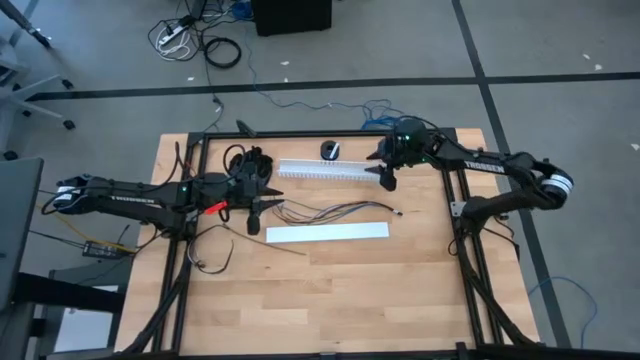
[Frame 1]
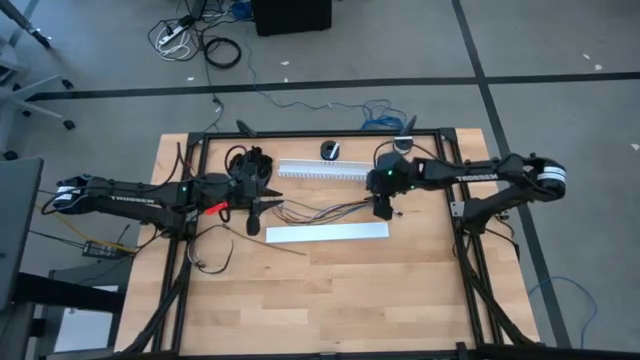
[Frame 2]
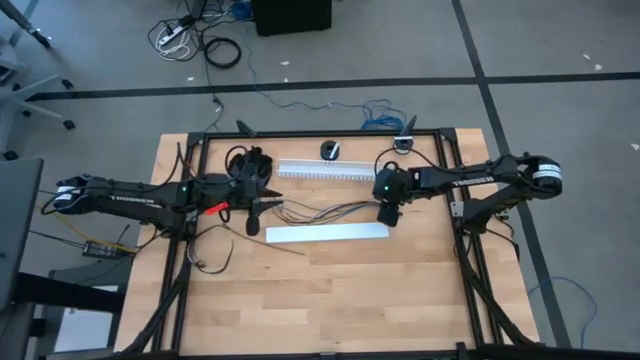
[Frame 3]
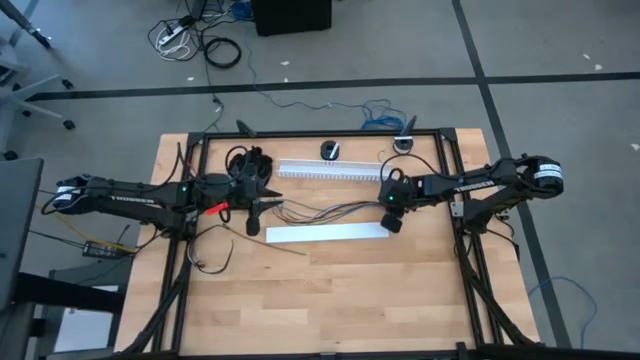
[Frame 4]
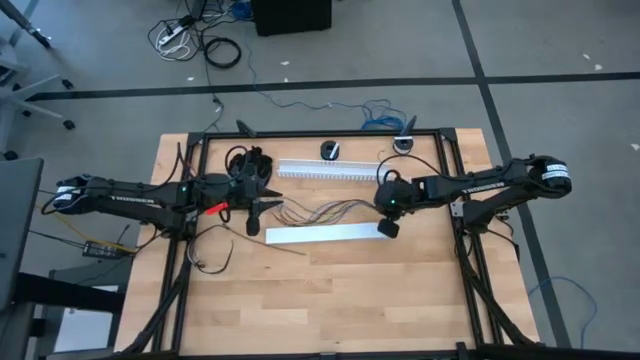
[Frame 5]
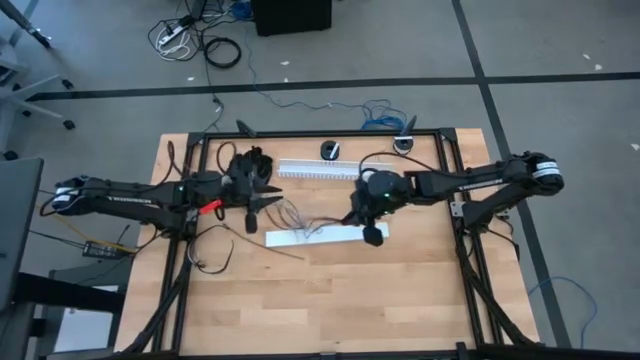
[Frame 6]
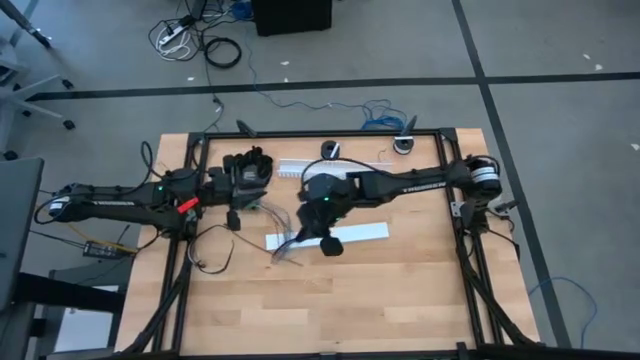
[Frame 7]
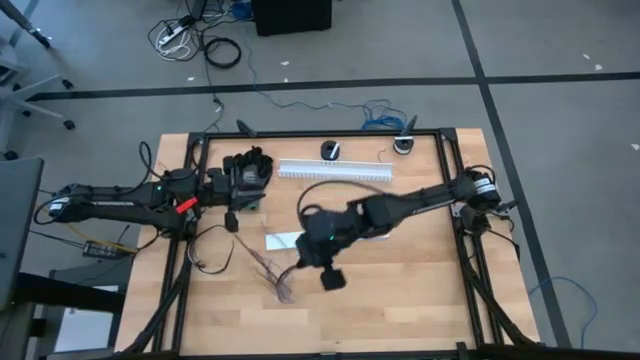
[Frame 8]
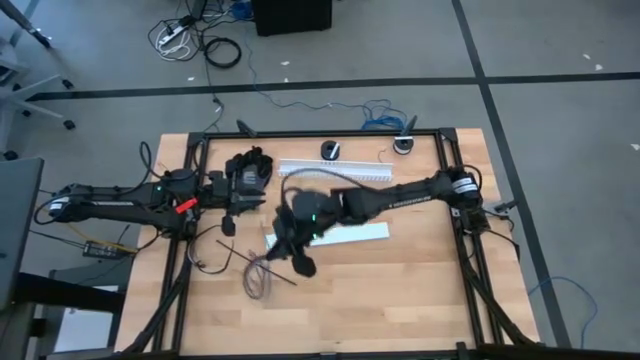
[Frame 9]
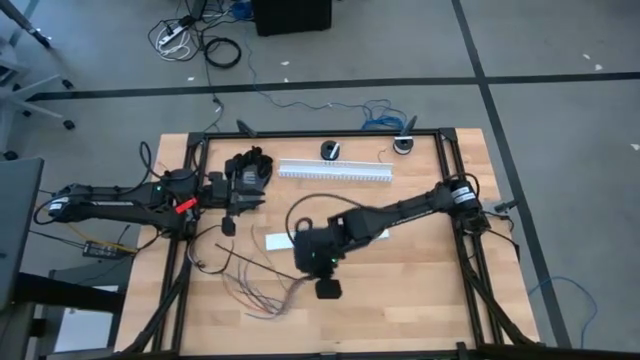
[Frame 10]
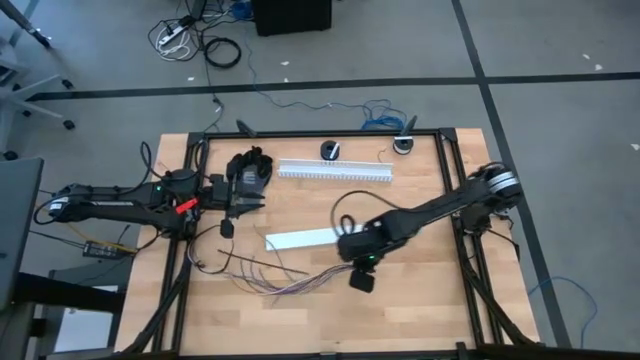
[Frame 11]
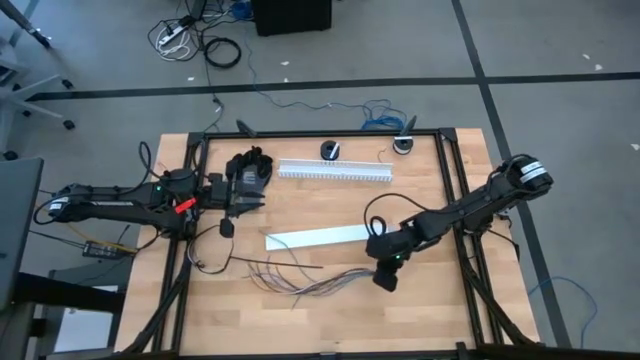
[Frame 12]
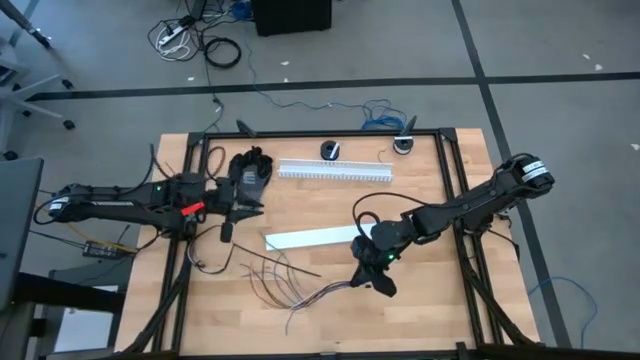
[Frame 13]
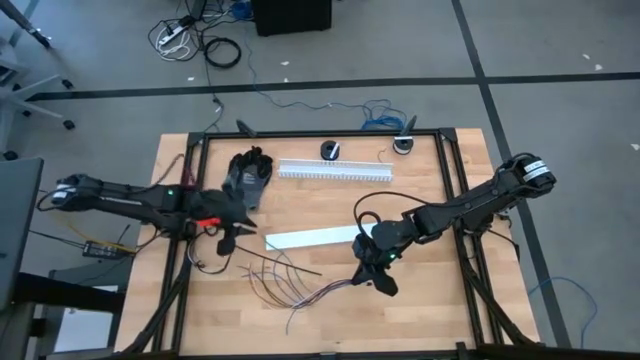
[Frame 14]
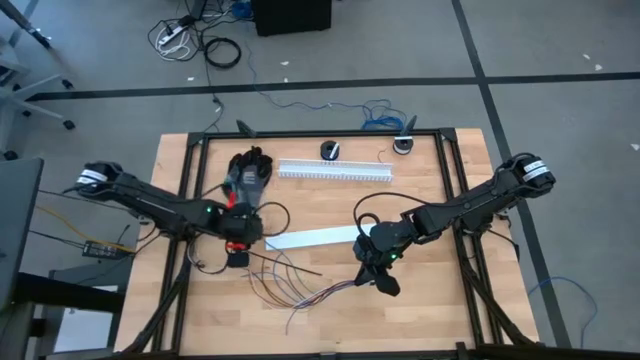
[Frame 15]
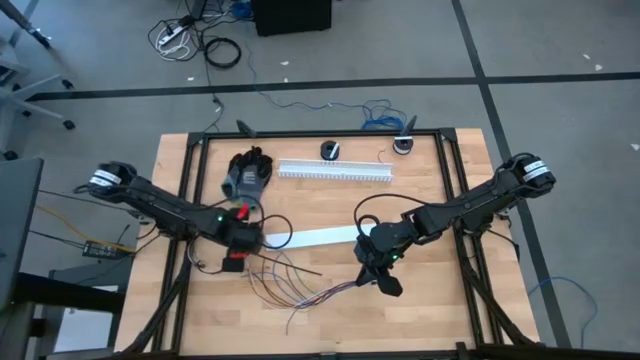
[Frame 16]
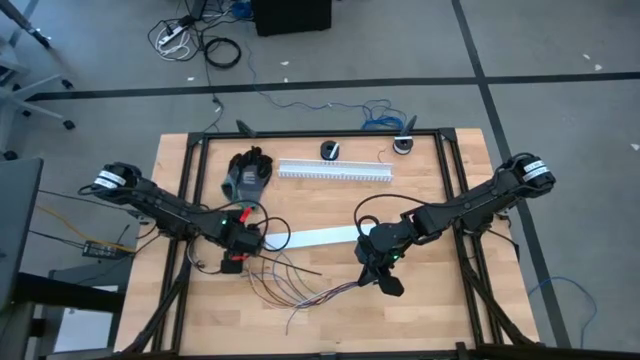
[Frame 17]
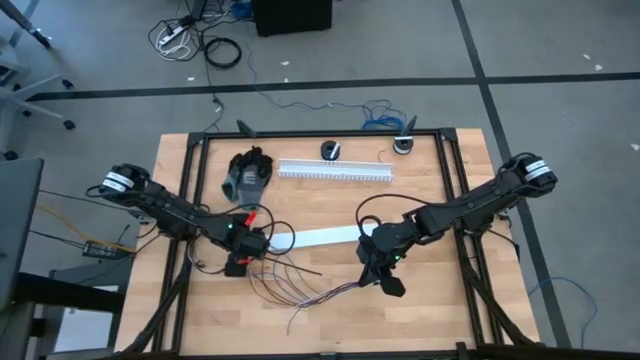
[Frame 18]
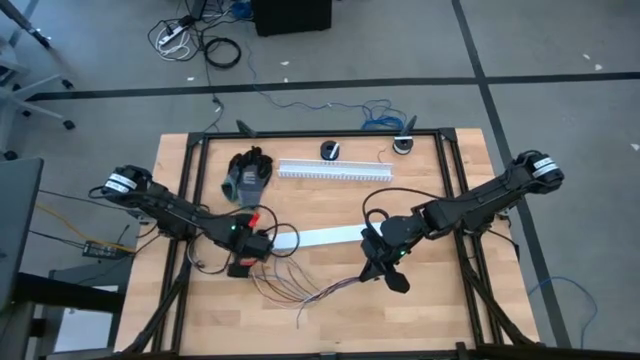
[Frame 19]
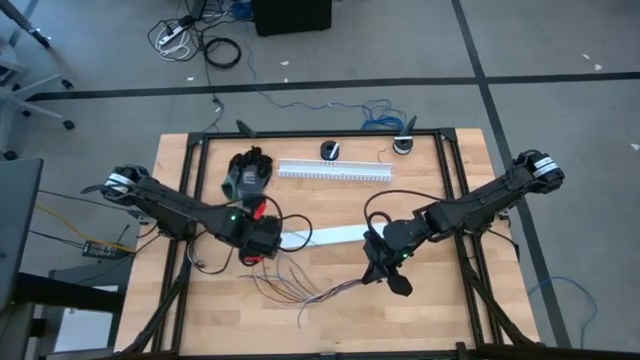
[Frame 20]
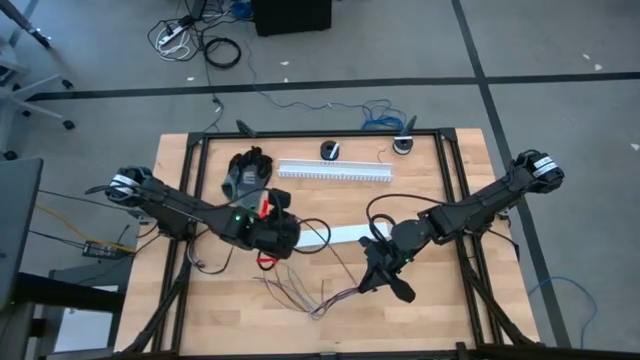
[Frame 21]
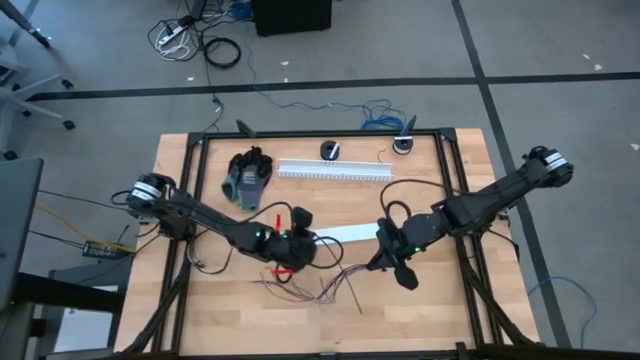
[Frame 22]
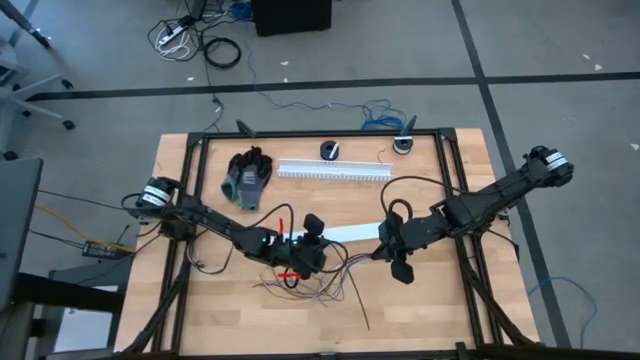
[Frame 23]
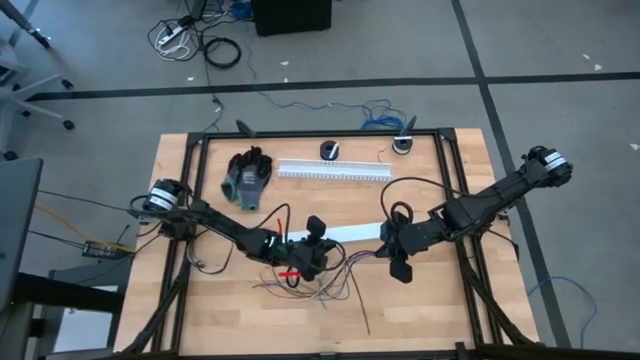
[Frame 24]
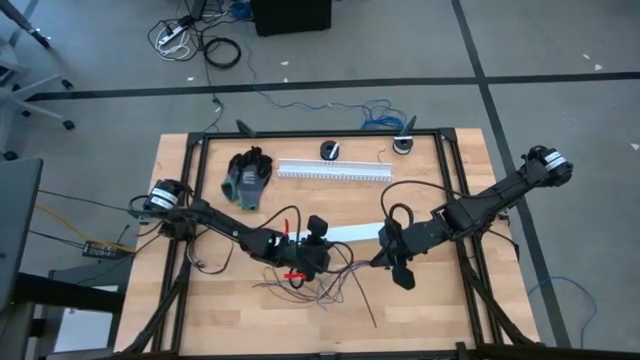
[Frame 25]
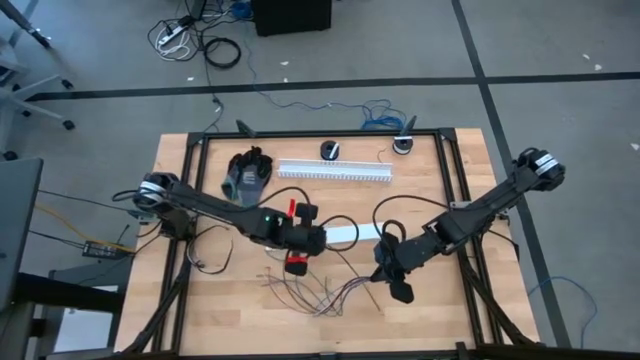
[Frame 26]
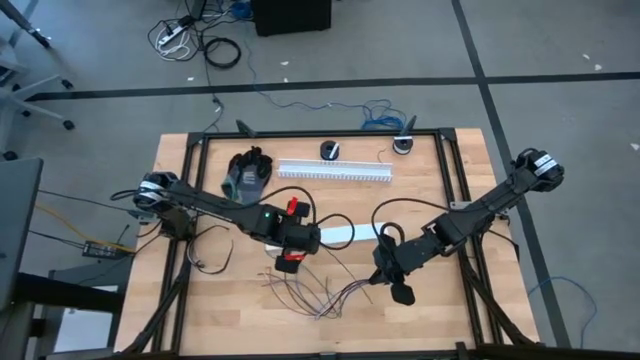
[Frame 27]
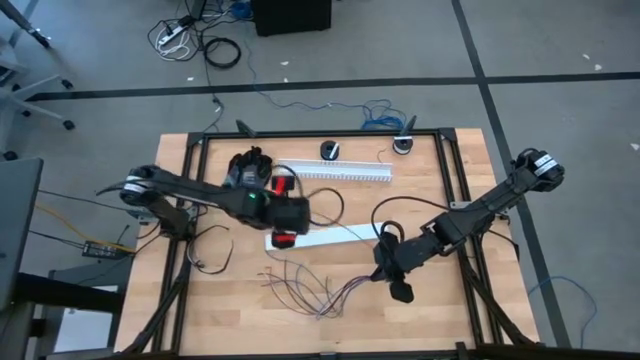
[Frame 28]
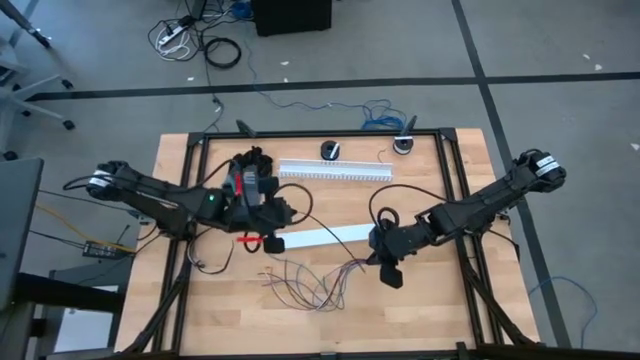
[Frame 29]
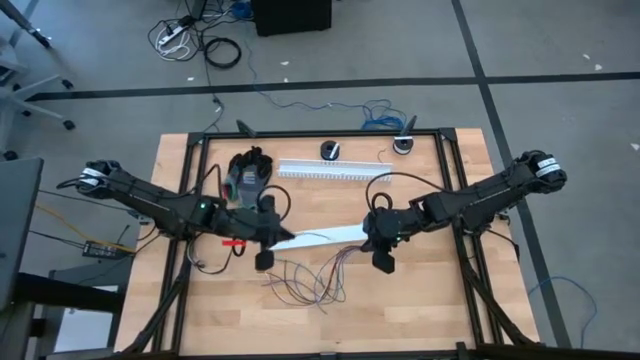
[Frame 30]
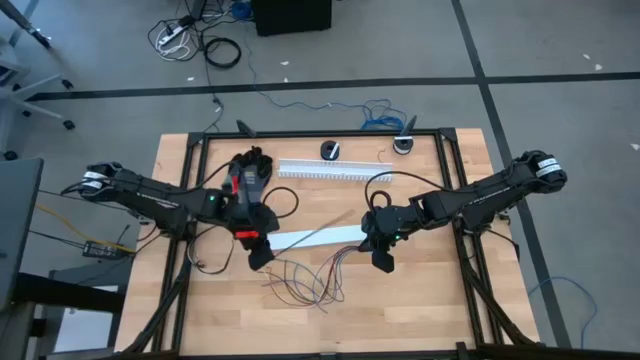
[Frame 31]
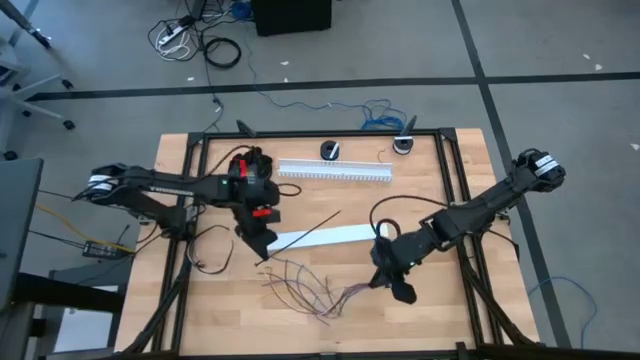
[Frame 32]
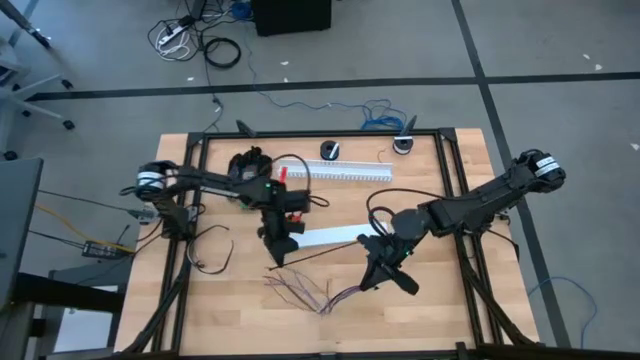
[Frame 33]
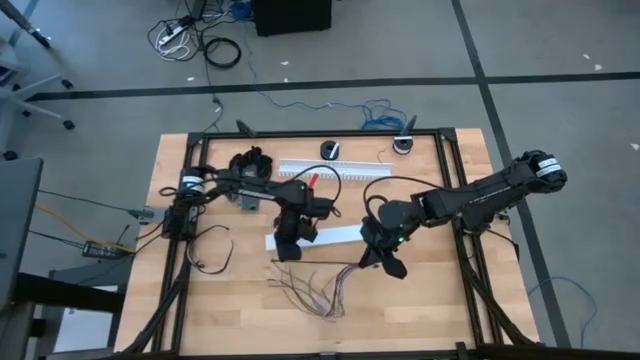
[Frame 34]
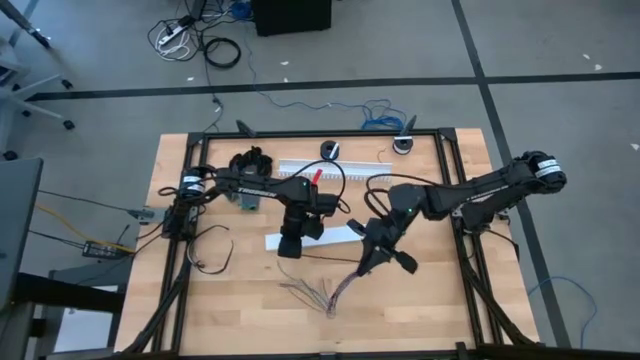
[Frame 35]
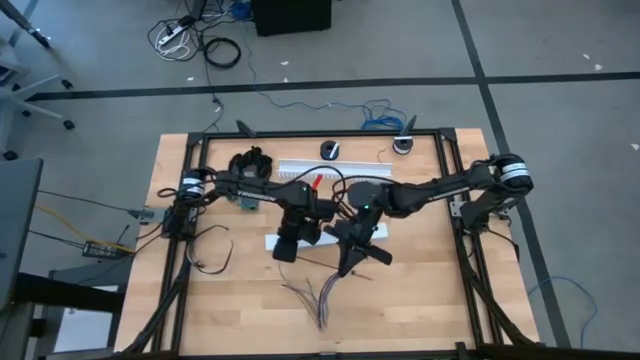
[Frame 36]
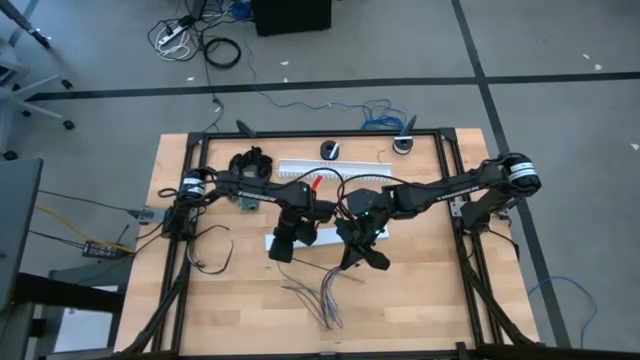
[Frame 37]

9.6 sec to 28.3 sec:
Task: Ziptie cables
Wrap the black zip tie around the cables
